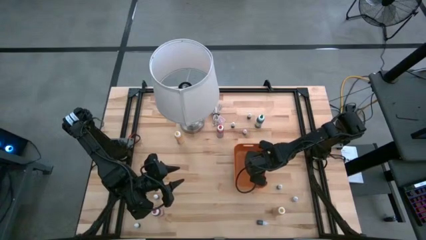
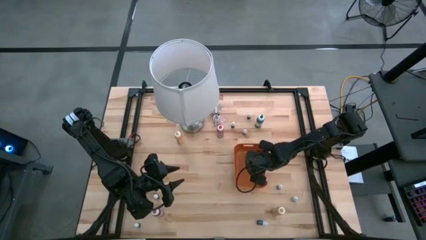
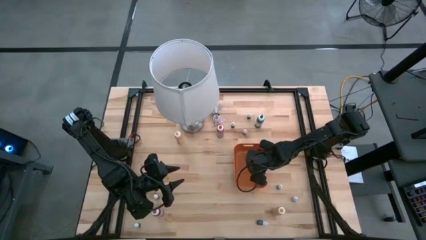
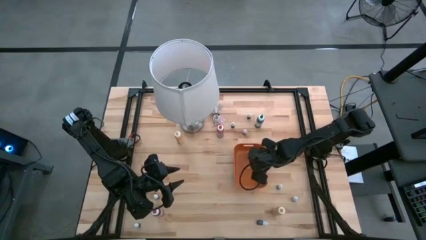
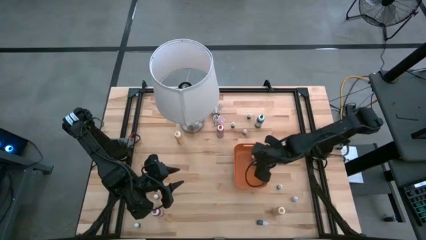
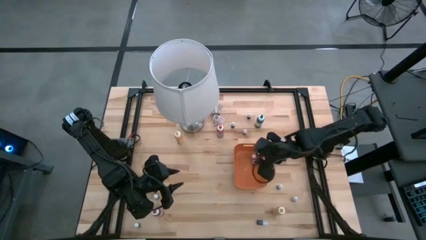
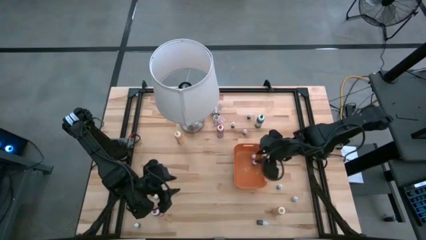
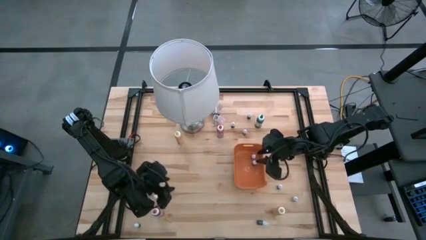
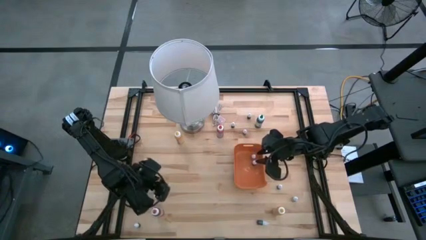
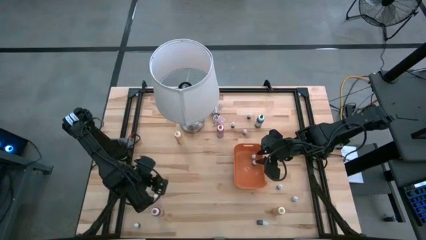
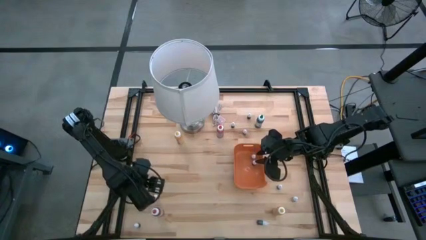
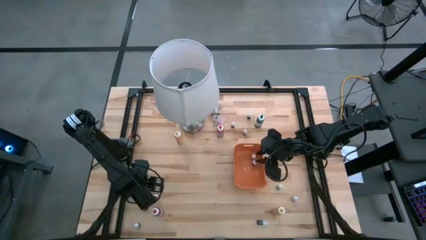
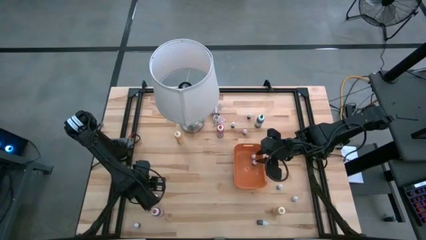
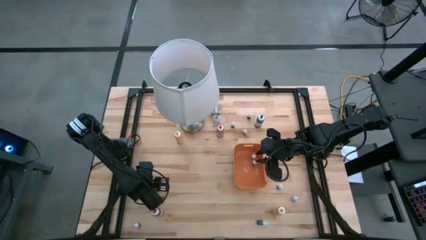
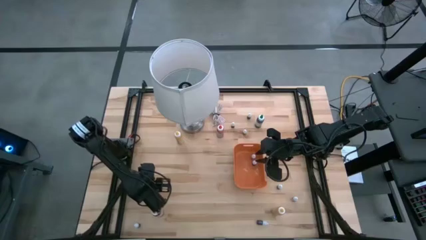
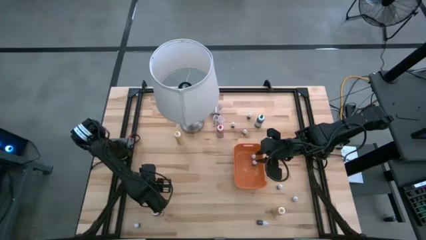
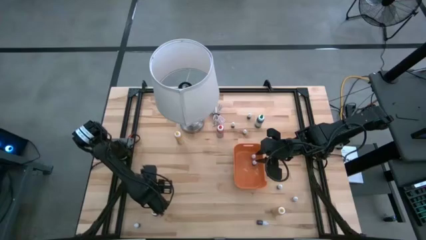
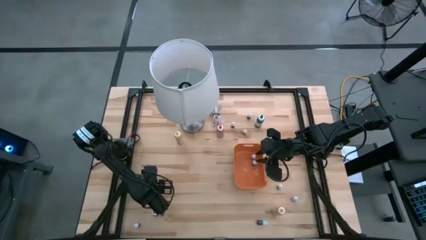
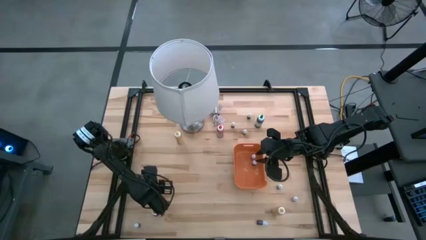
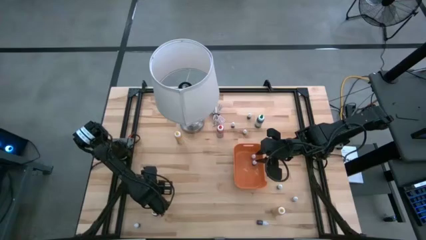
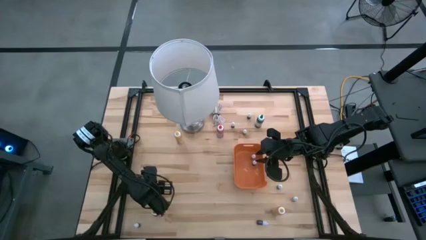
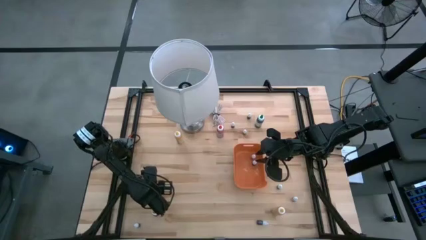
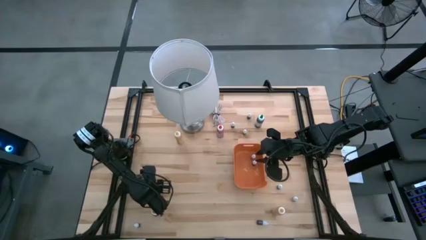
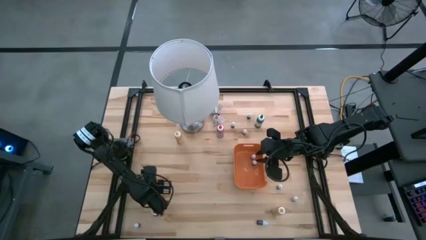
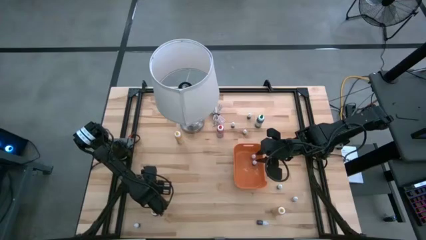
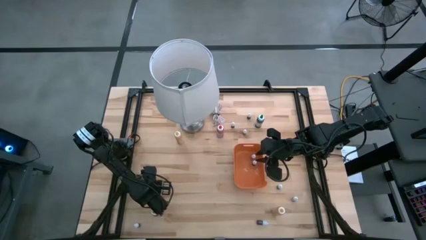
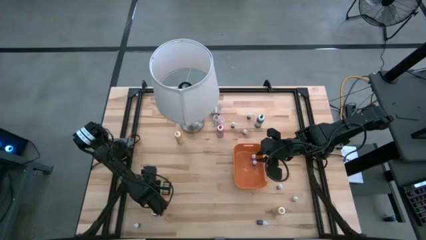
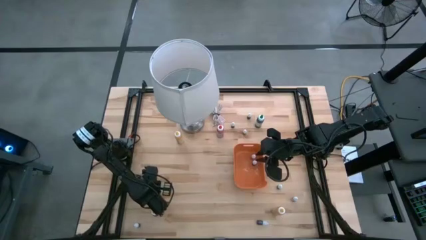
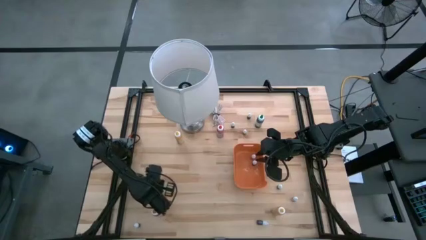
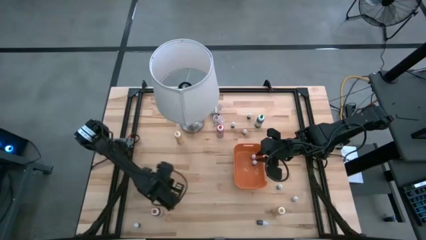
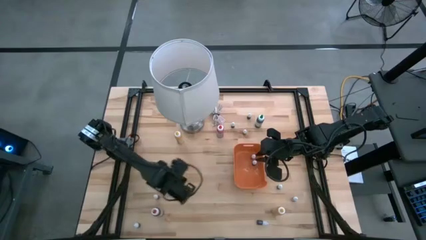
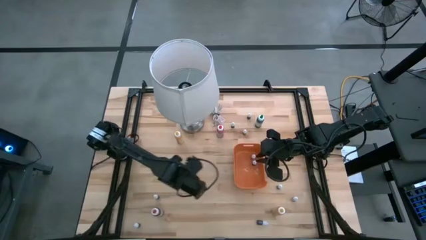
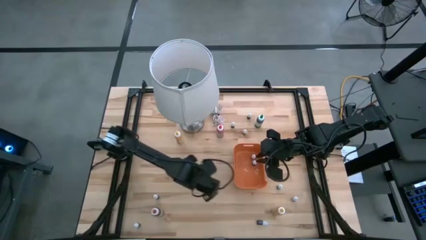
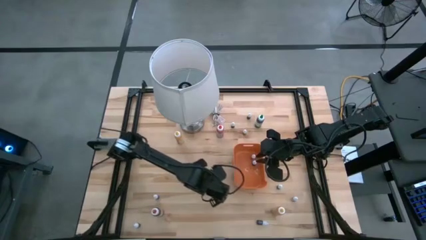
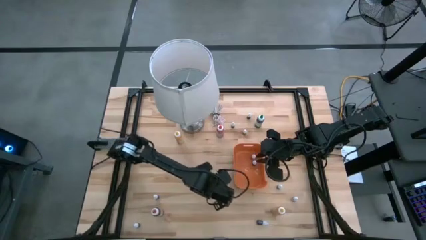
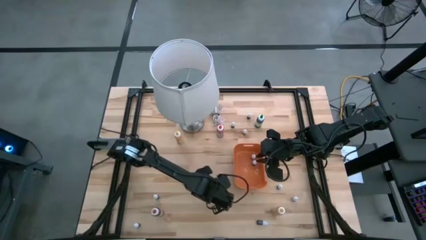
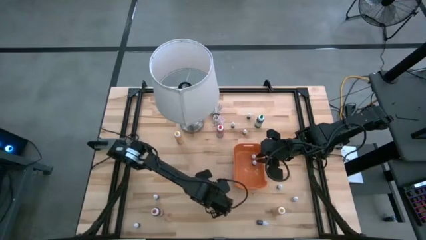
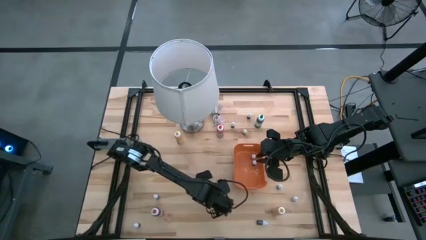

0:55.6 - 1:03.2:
Task: Pick & Place food coloring
Move the small food coloring bottle from the left to the center of the table

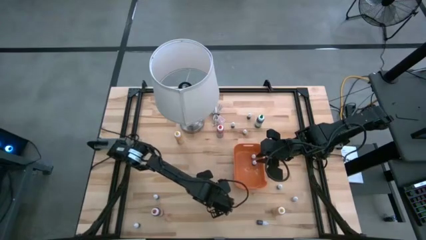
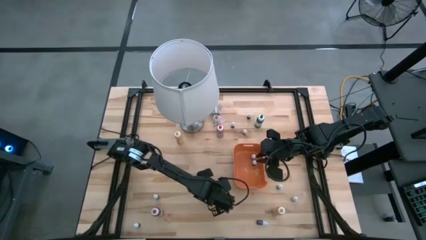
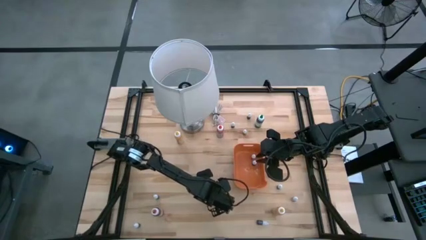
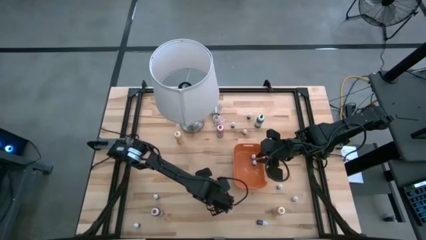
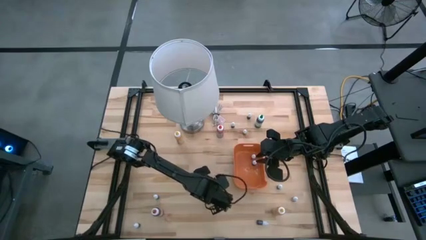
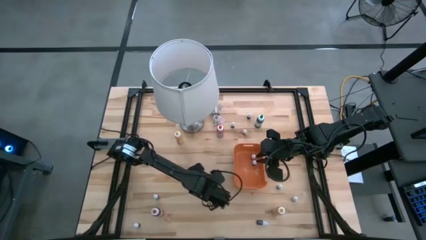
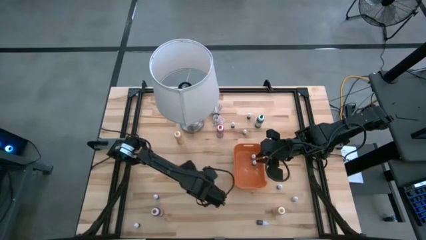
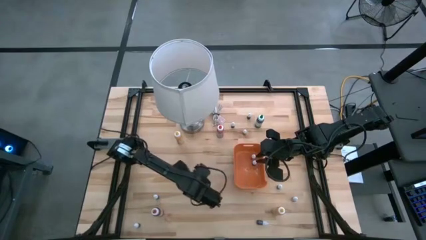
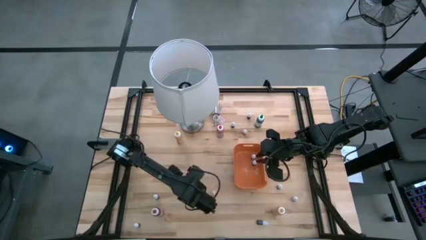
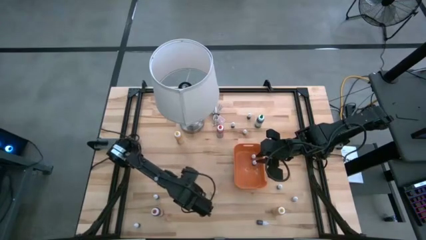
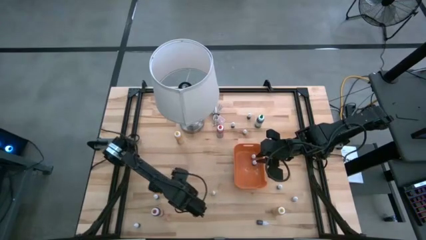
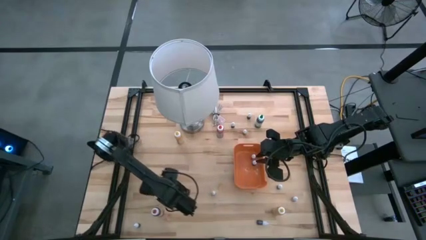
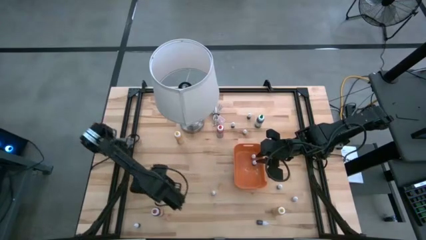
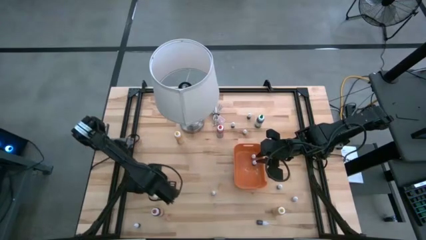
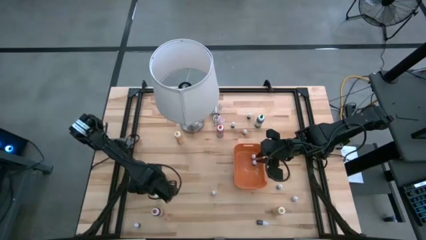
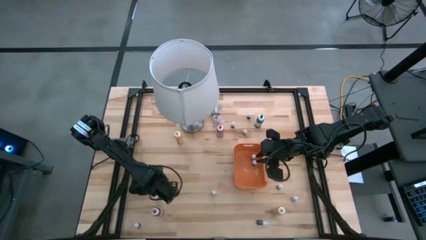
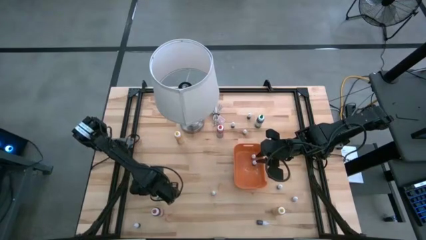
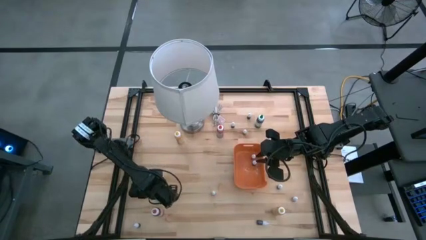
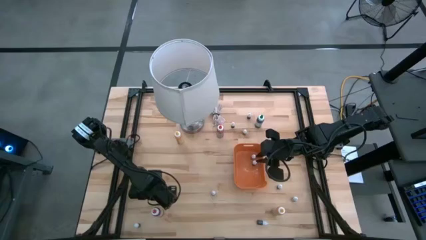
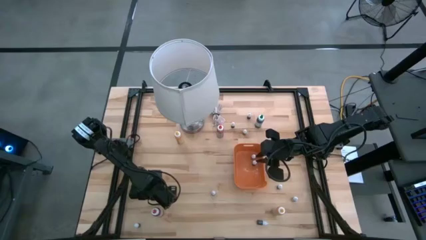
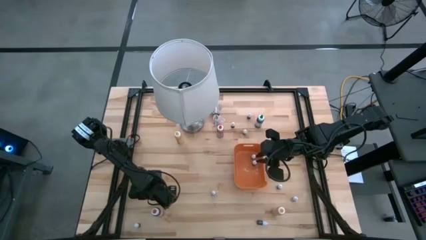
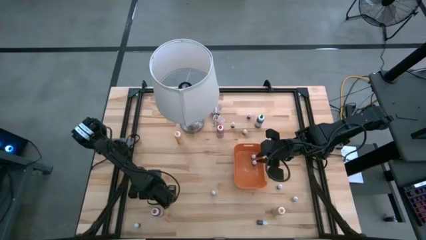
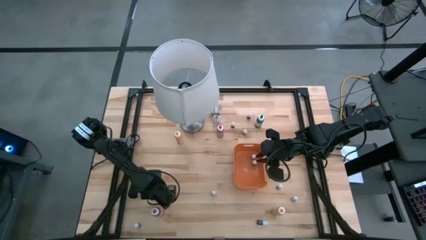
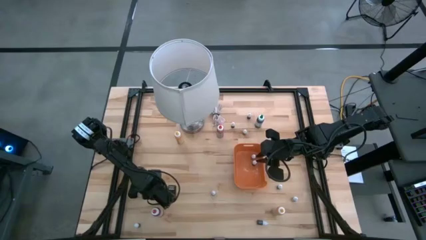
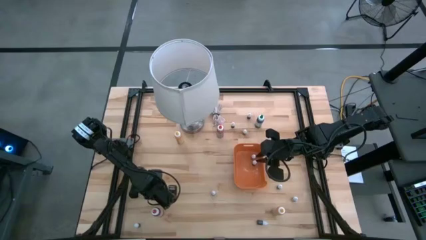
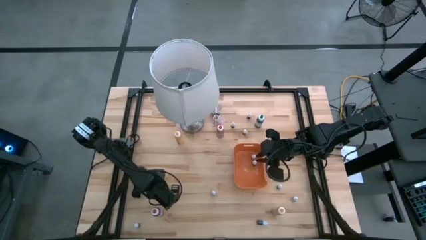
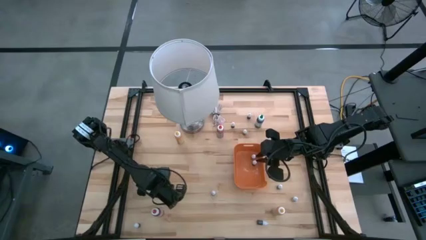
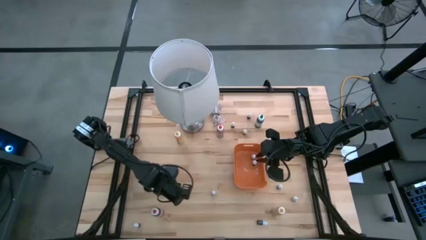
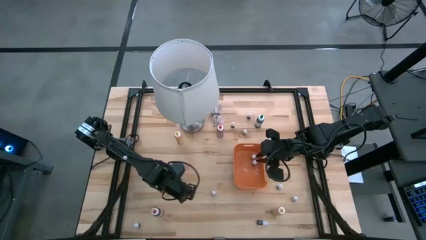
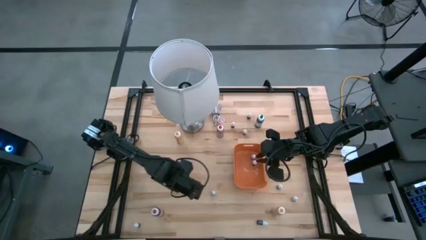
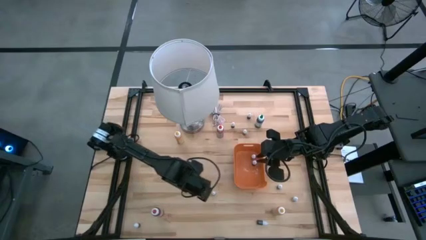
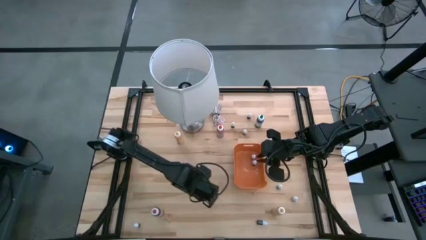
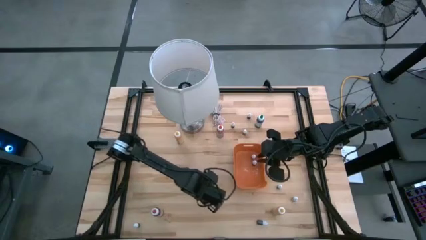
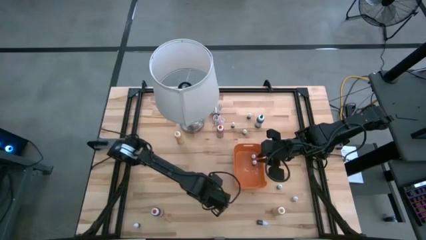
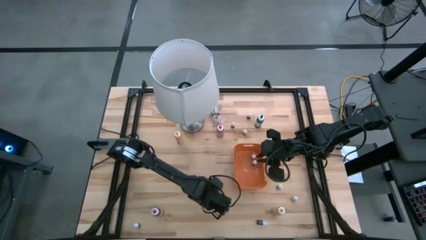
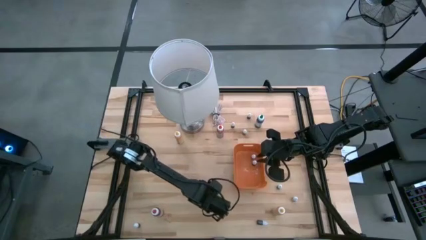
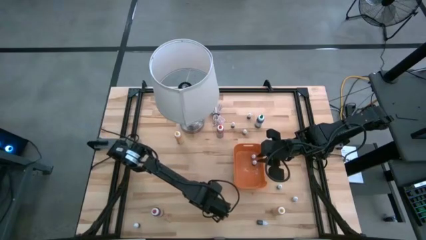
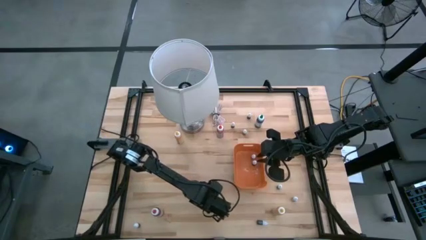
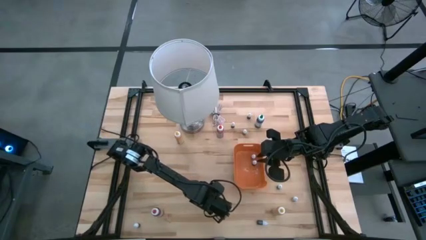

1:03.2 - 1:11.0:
Move the small food coloring bottle from the left to the center of the table
